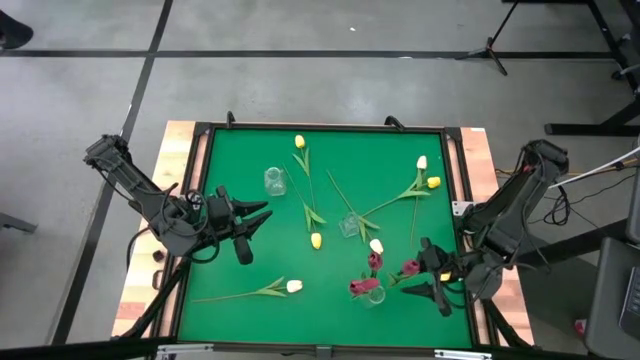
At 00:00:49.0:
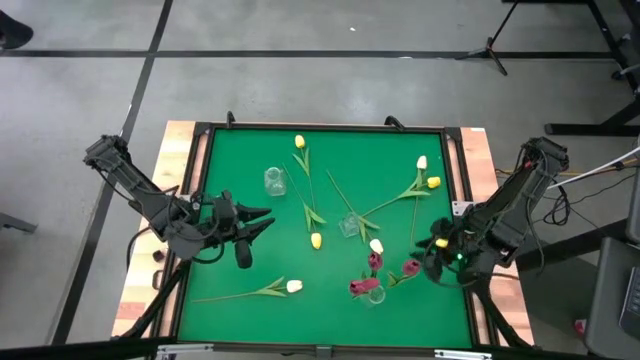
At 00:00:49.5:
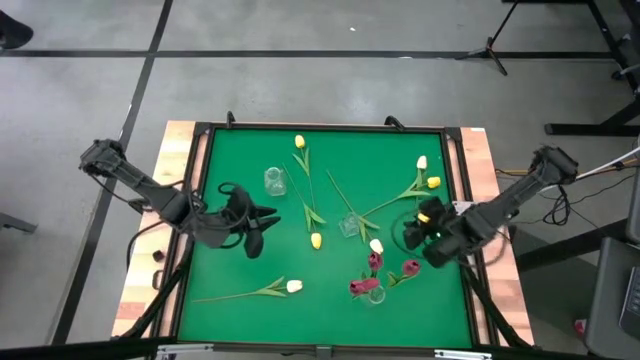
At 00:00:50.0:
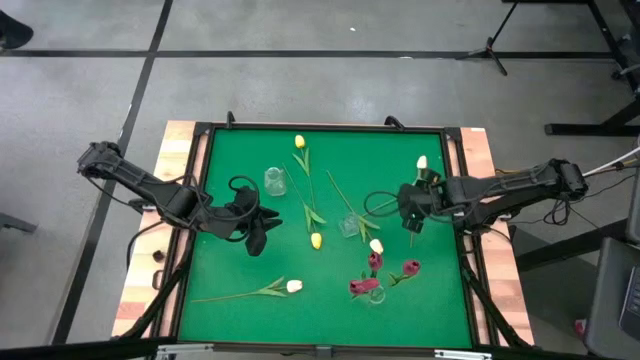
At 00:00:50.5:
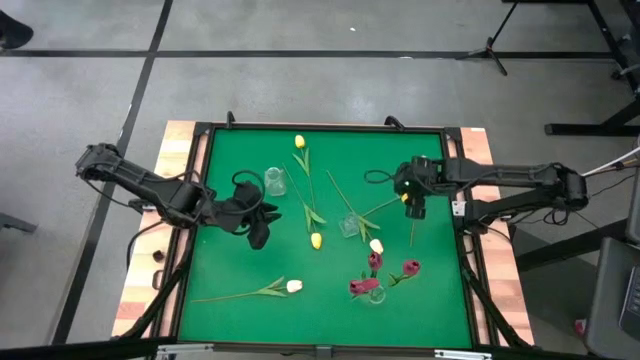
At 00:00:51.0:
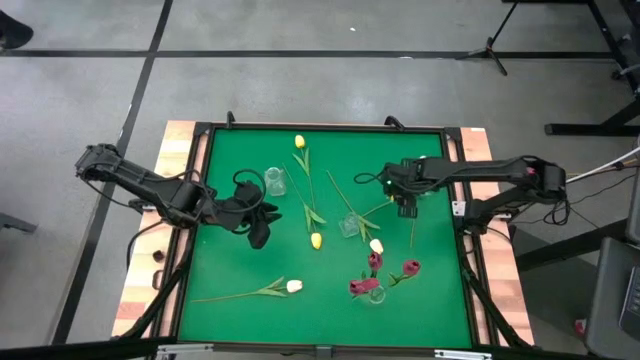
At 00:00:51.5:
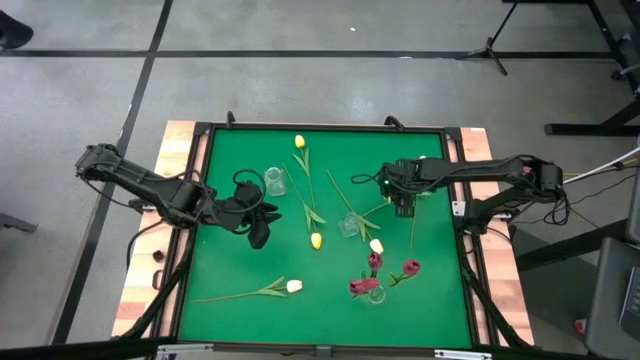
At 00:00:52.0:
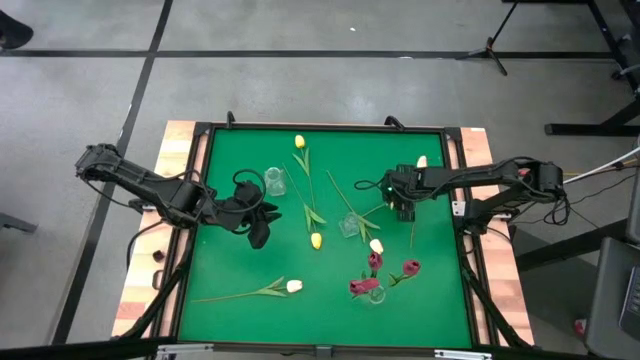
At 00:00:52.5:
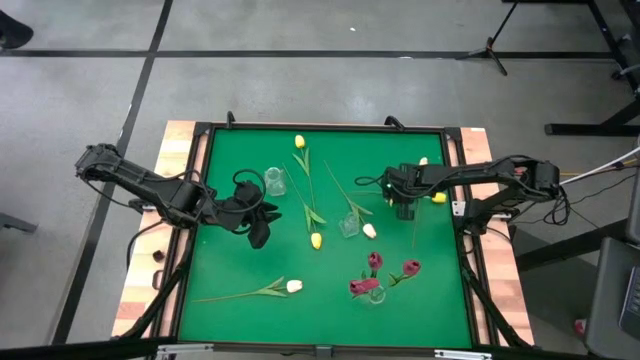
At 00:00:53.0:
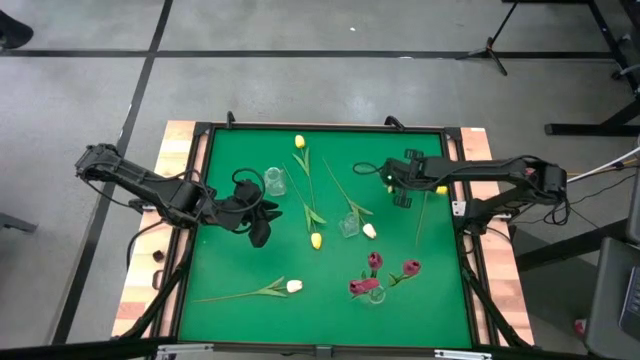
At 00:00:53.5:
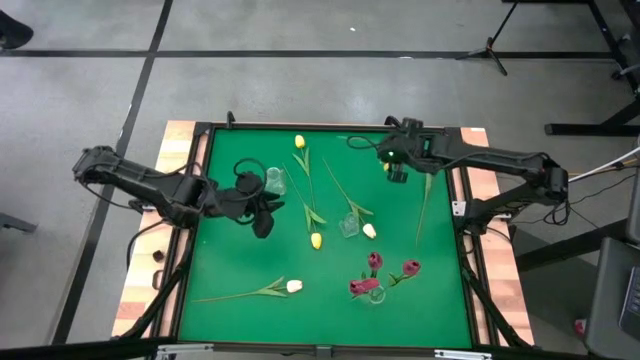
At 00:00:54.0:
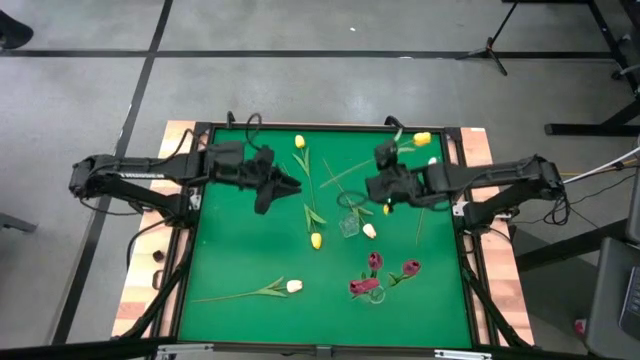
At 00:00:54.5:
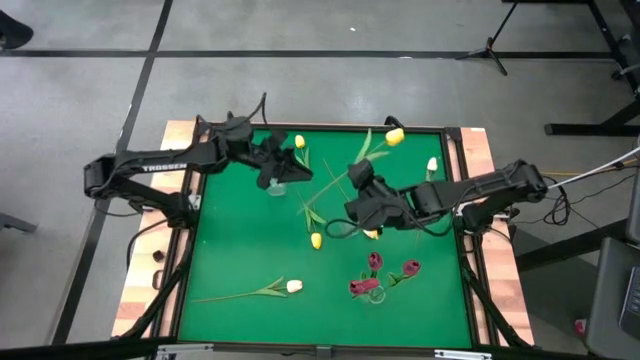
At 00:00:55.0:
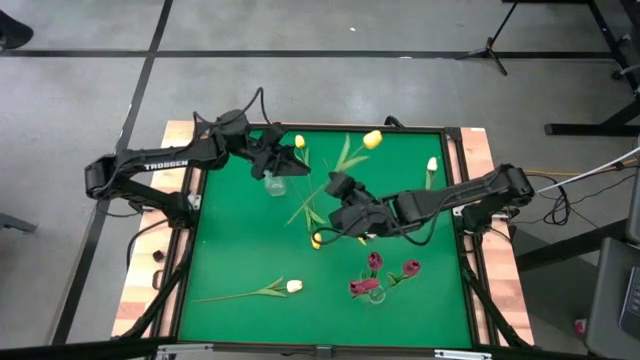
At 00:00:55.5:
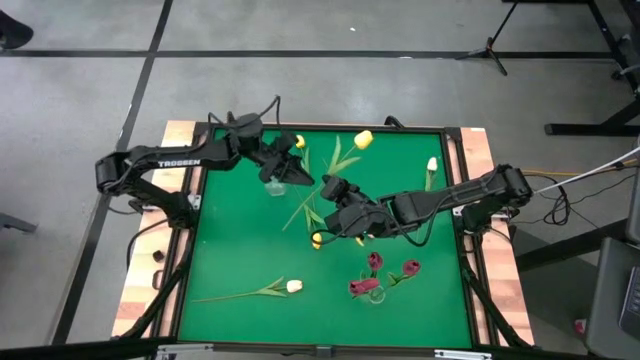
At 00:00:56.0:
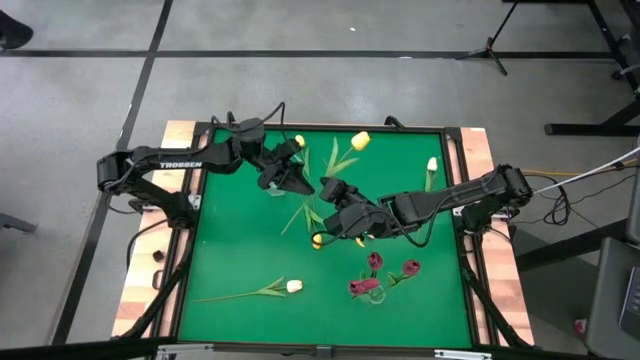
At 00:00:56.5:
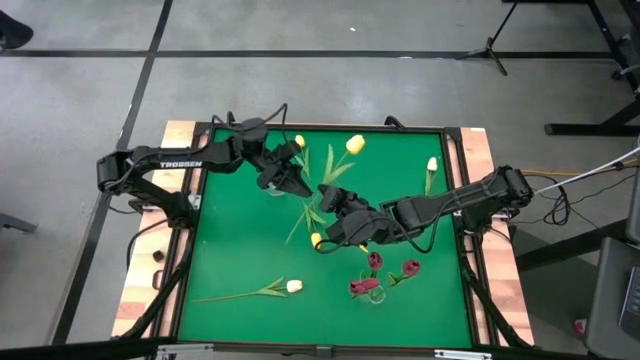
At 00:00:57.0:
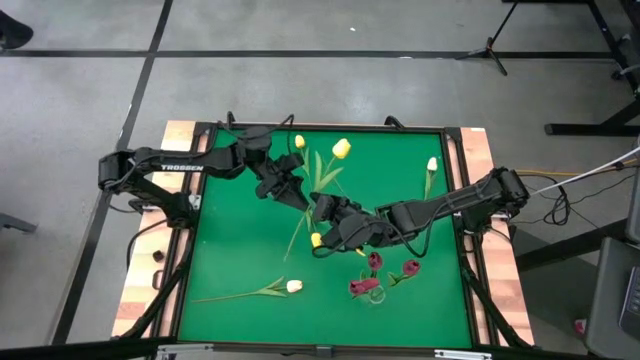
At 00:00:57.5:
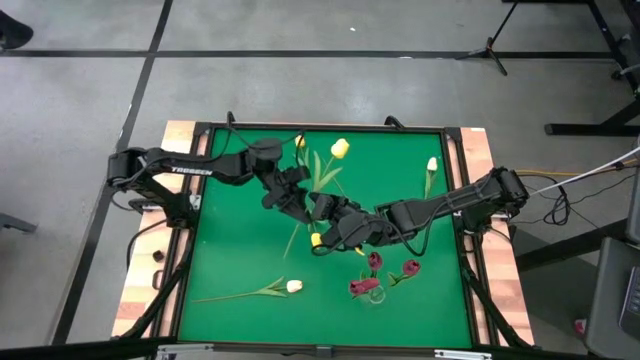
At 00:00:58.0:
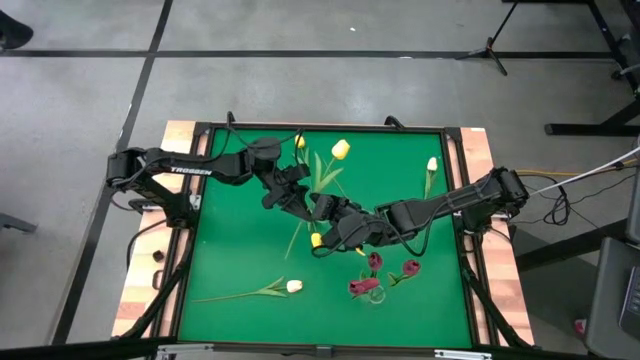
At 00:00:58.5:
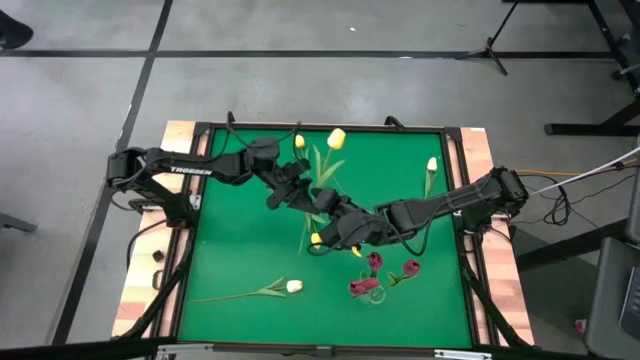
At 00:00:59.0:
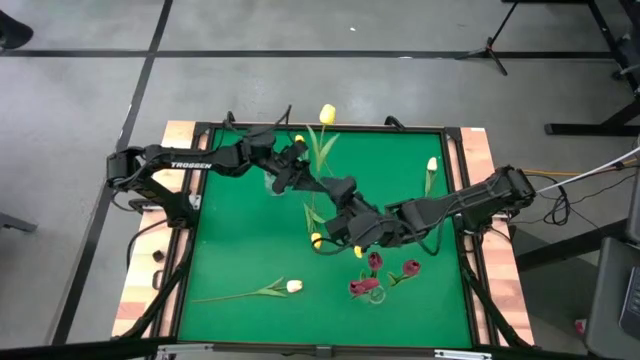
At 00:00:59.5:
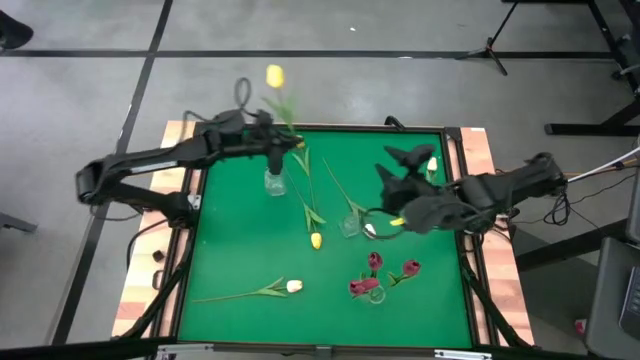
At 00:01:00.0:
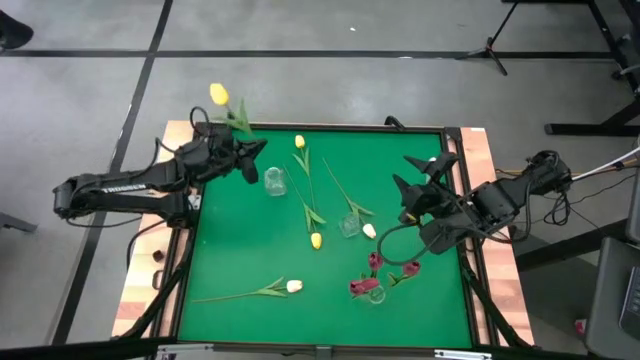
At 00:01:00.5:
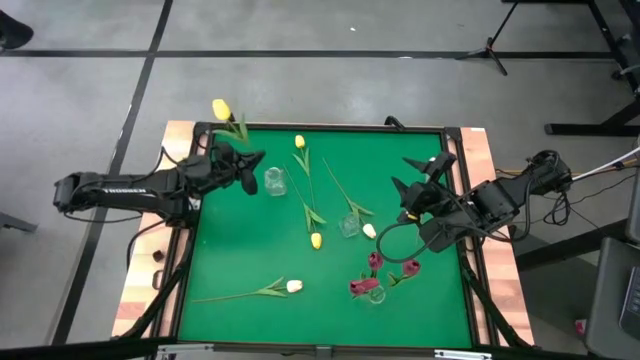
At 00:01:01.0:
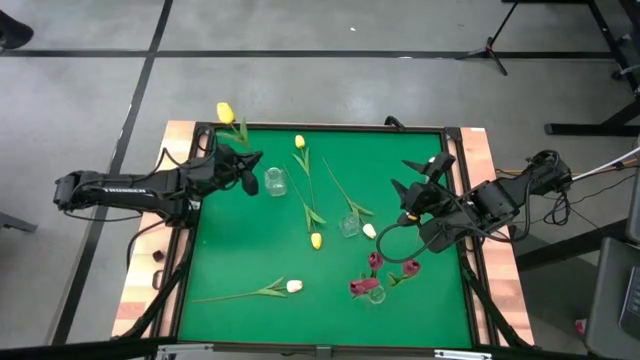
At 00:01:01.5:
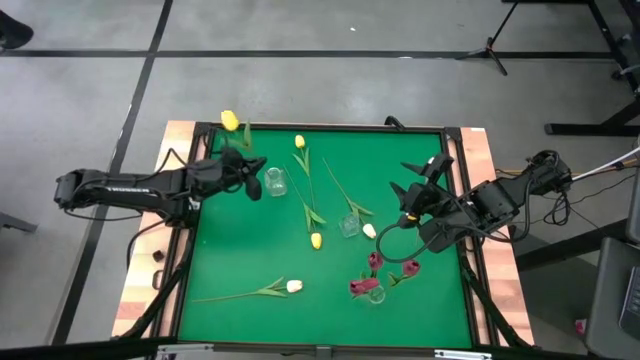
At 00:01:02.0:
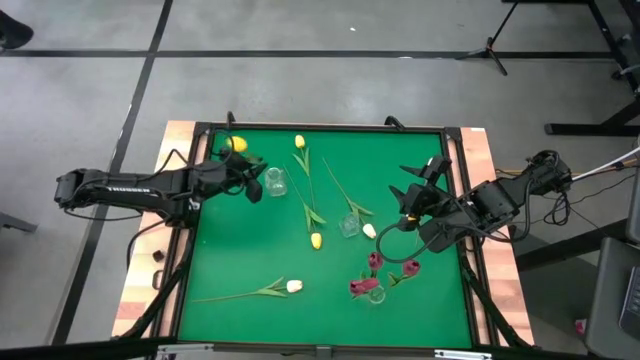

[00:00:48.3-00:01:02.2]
Task: Sort flowers into vase by color
Put the top right yellow tulip into the top left transparent vase

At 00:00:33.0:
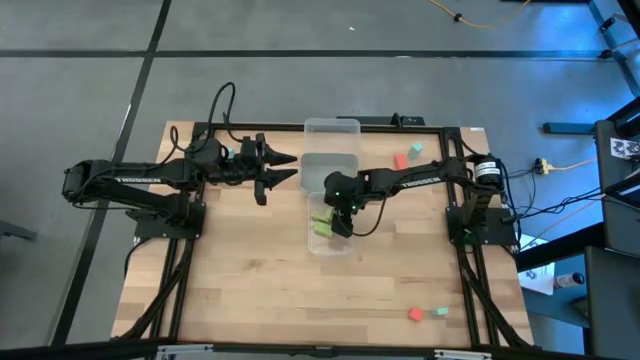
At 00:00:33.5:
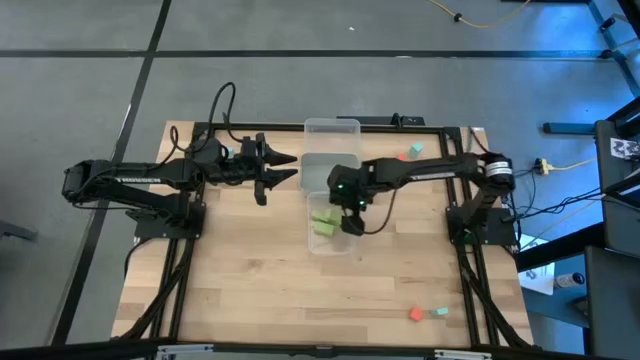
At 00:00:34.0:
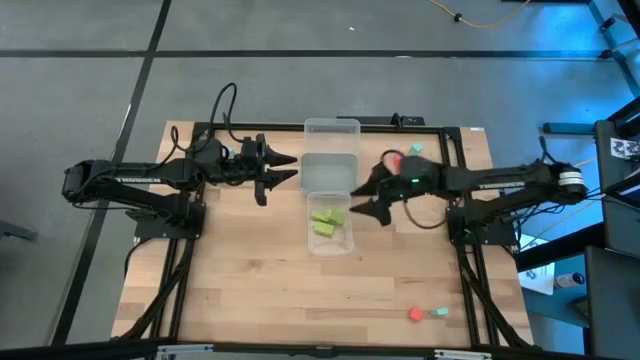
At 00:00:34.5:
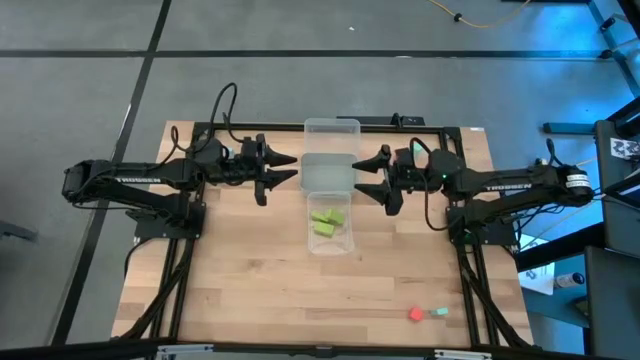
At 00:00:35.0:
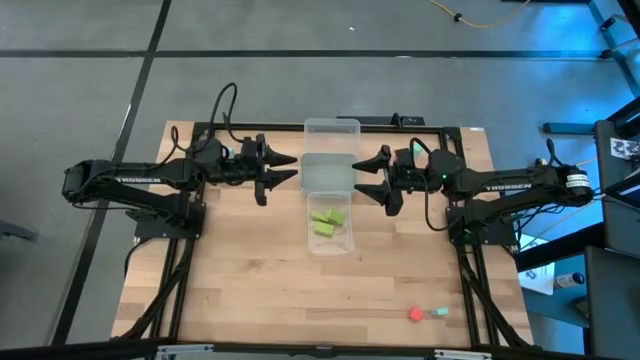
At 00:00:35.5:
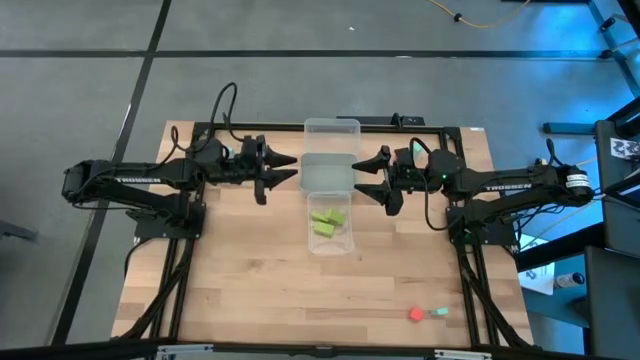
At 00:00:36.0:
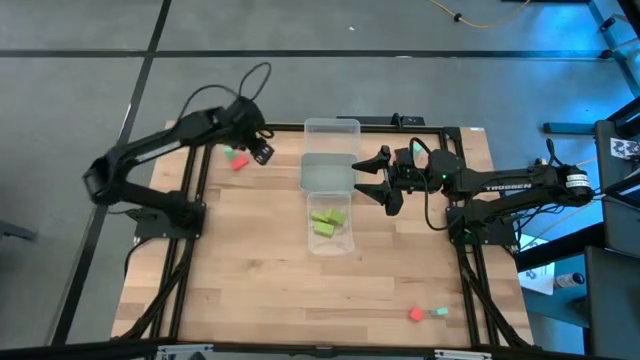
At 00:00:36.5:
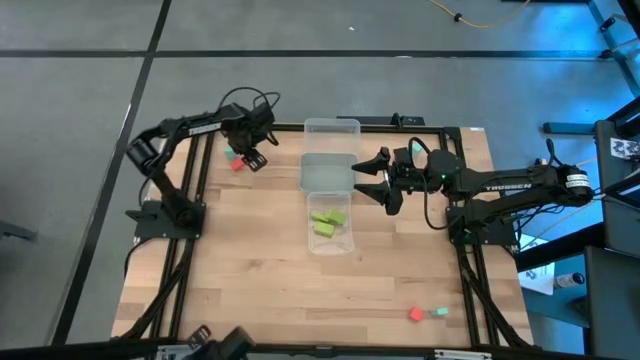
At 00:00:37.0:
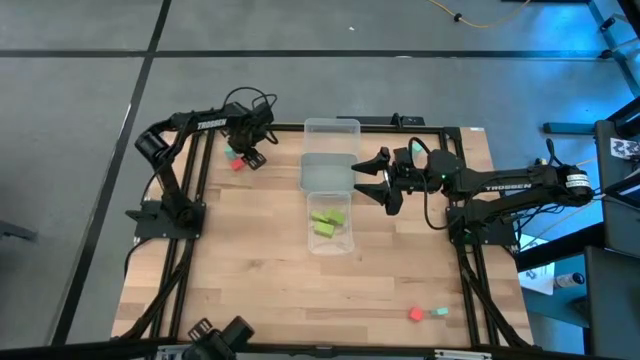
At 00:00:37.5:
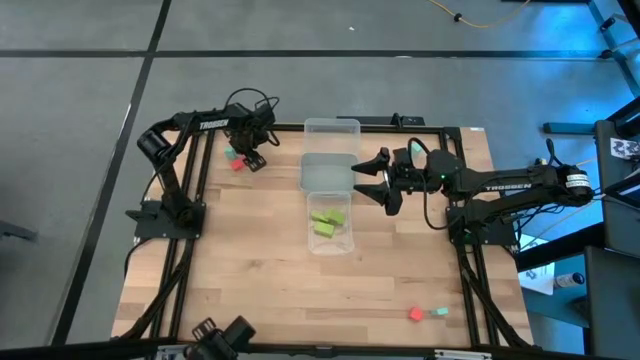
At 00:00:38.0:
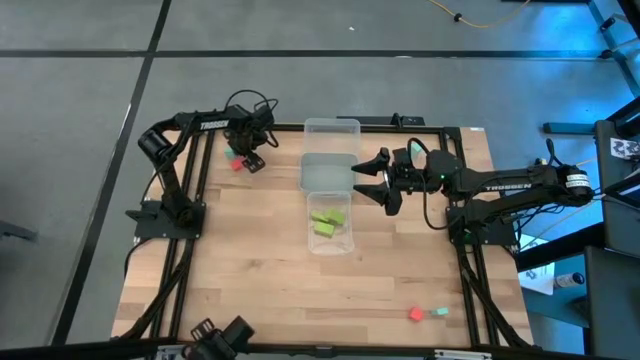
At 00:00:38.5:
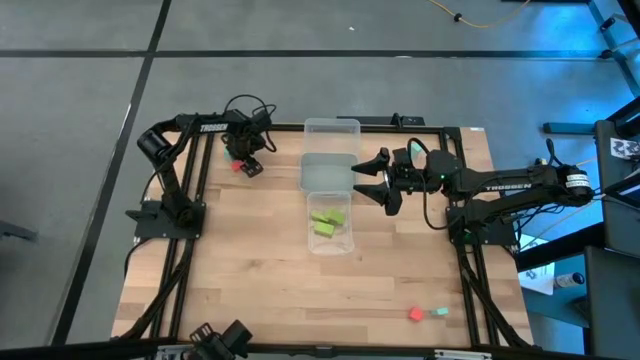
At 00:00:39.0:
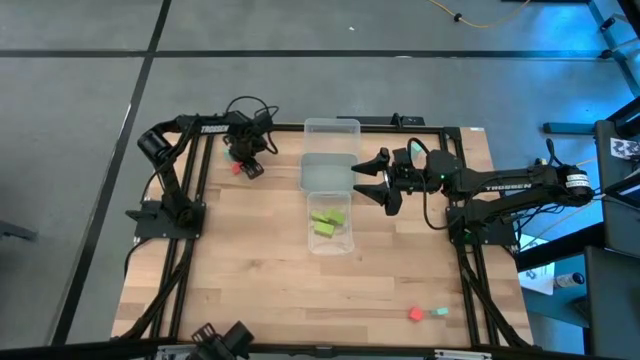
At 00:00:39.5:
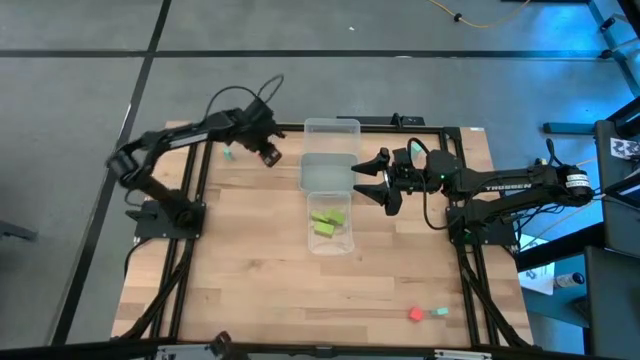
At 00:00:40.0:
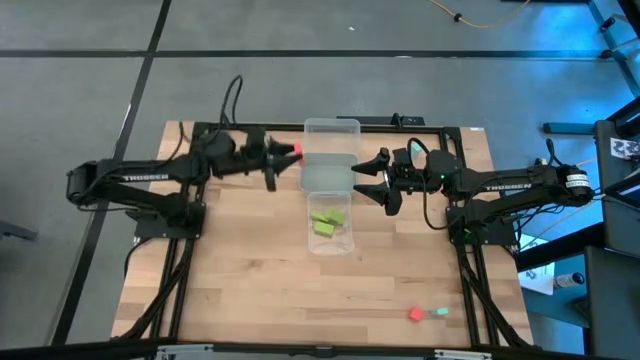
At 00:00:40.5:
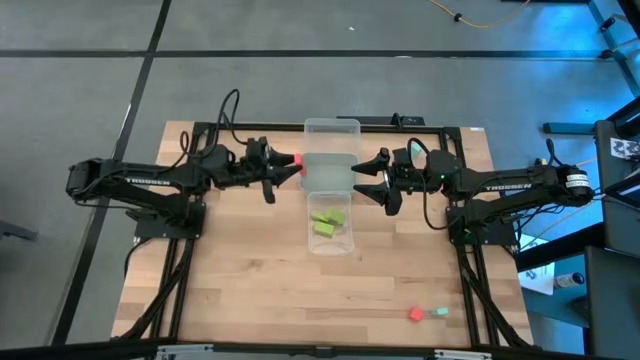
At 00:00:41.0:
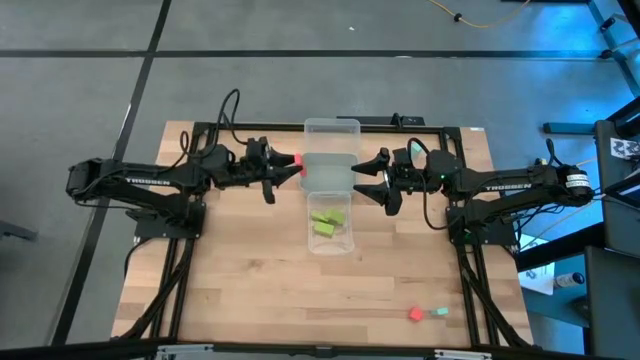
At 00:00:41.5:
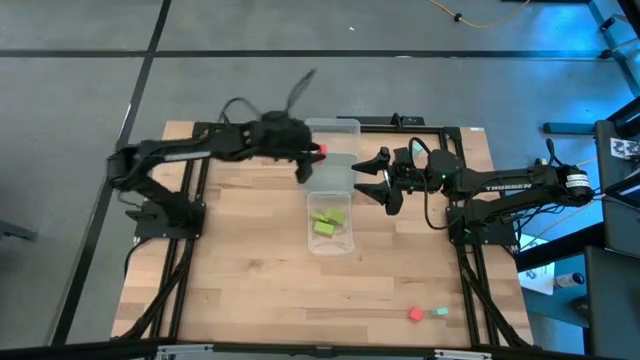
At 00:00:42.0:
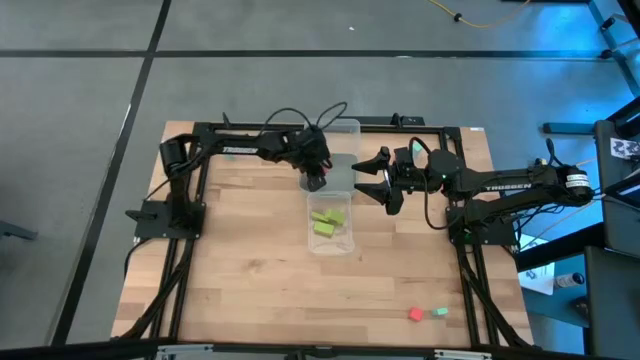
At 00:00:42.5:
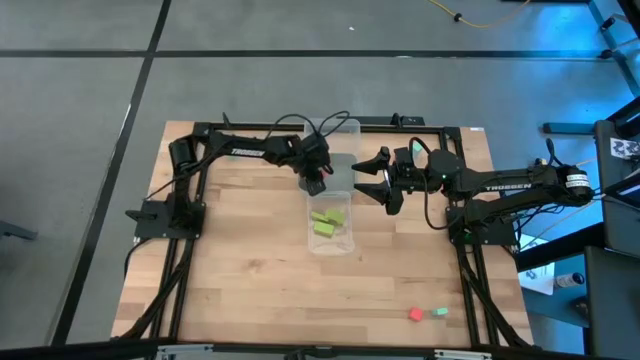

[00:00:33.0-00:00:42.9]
Task: Sort & place blocks by color
Put the top left orange block into the gray bin
